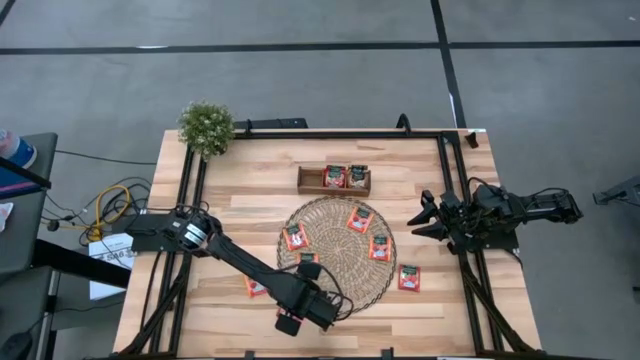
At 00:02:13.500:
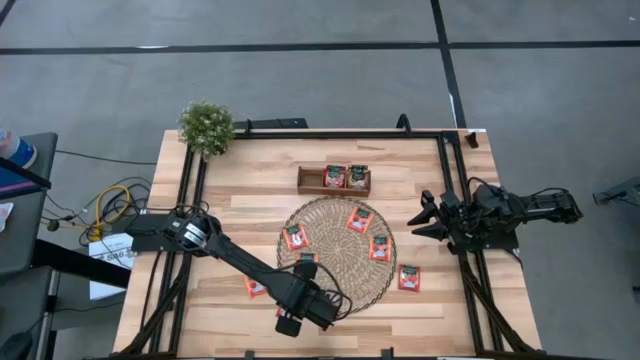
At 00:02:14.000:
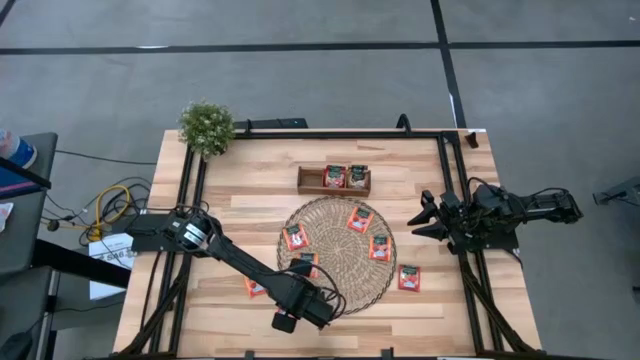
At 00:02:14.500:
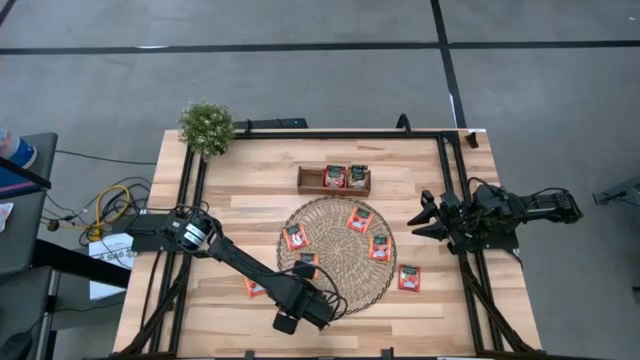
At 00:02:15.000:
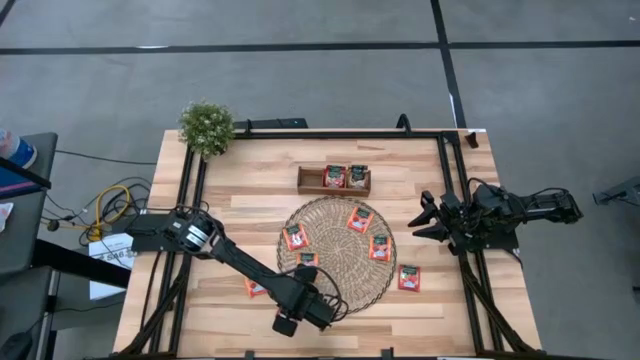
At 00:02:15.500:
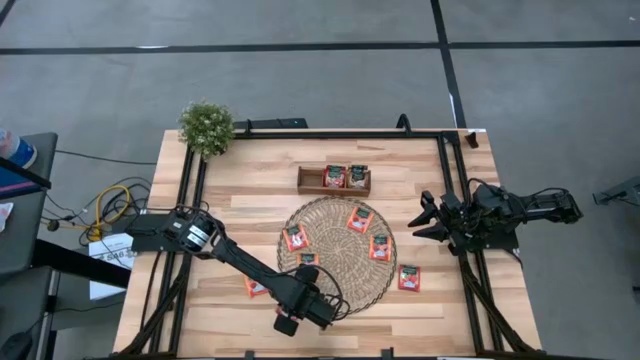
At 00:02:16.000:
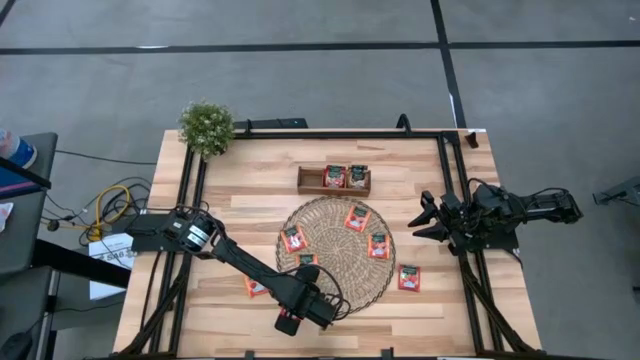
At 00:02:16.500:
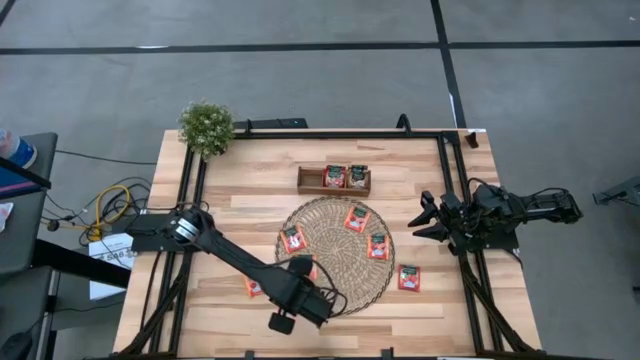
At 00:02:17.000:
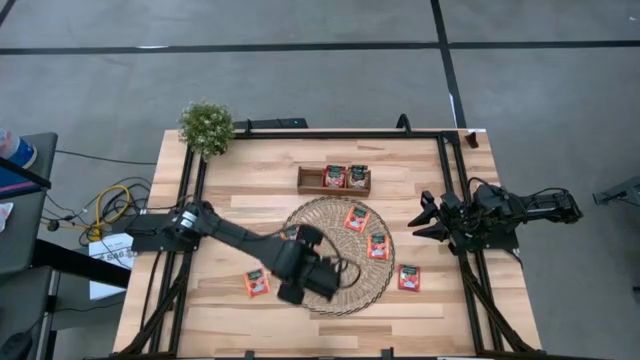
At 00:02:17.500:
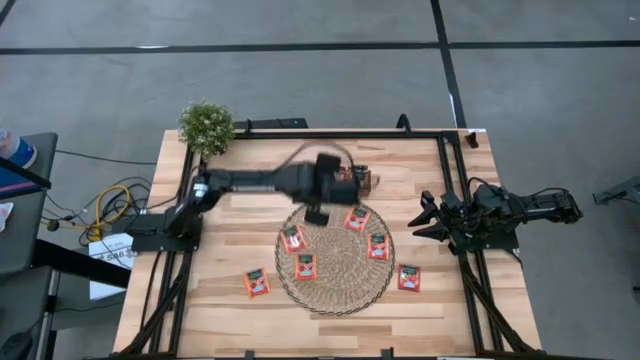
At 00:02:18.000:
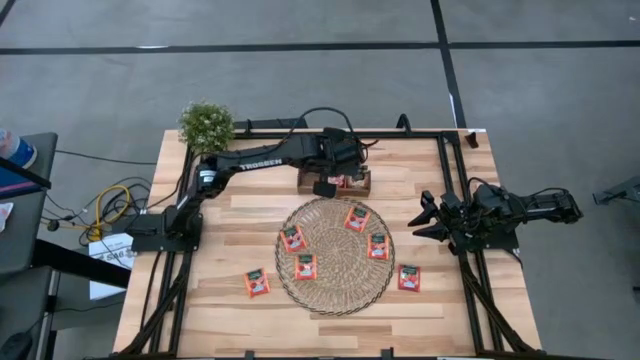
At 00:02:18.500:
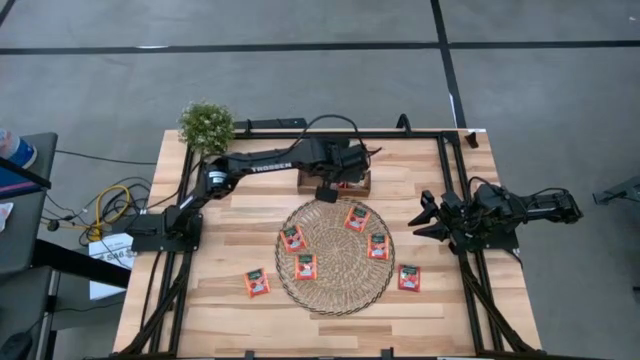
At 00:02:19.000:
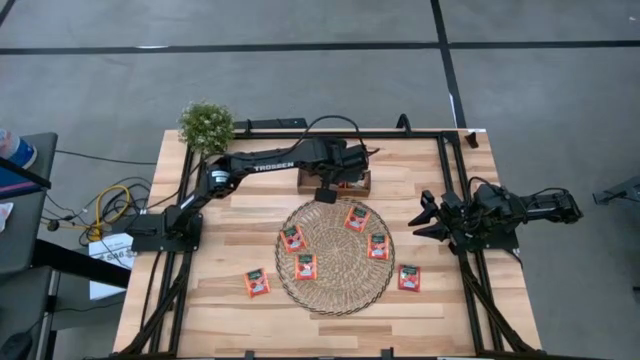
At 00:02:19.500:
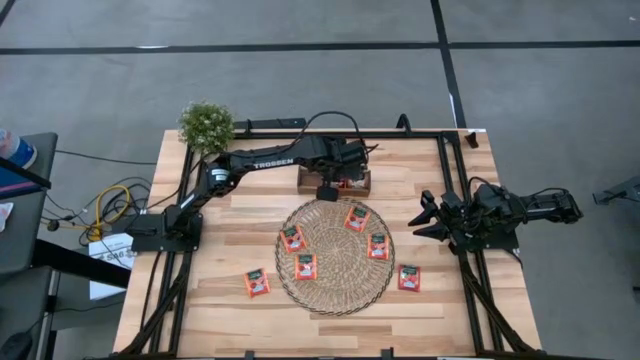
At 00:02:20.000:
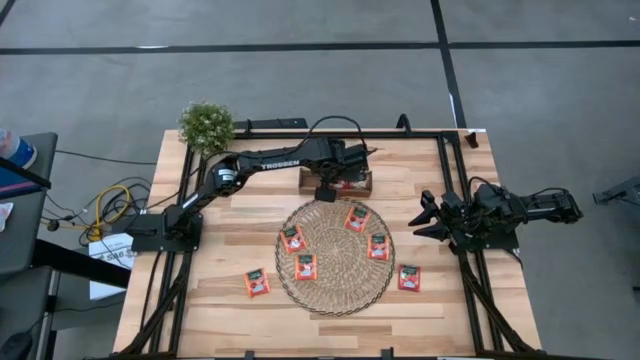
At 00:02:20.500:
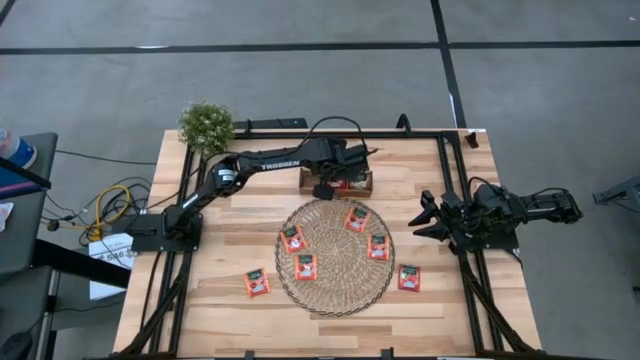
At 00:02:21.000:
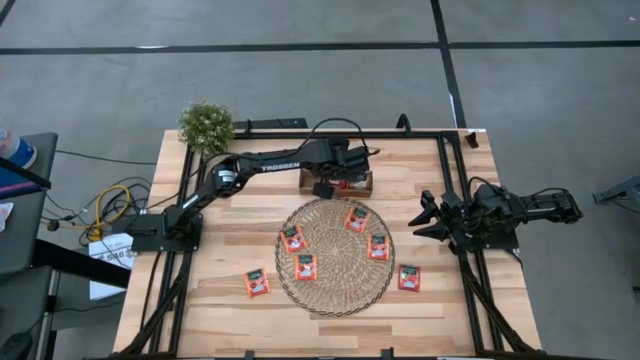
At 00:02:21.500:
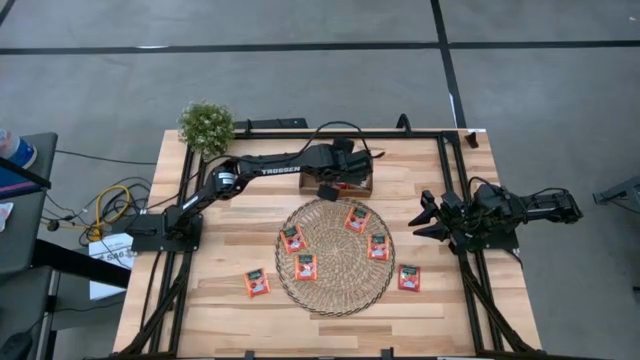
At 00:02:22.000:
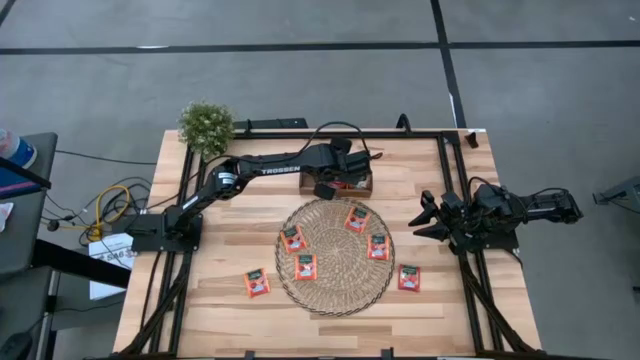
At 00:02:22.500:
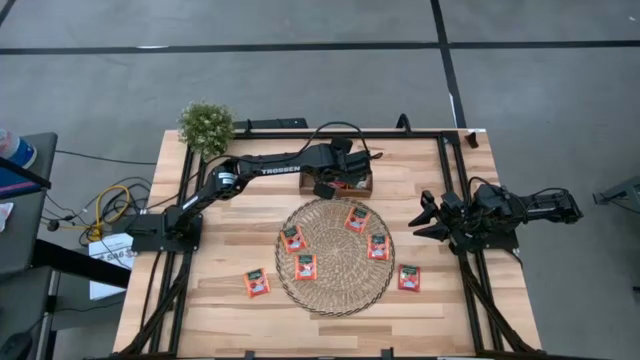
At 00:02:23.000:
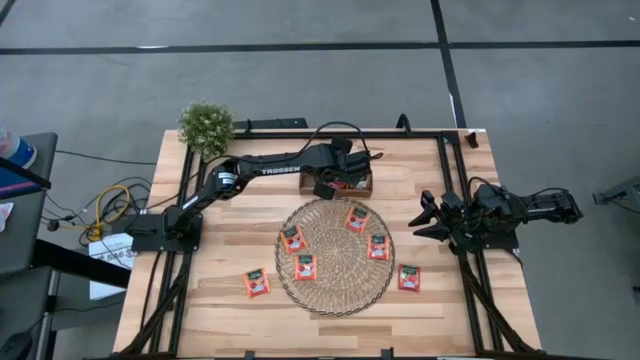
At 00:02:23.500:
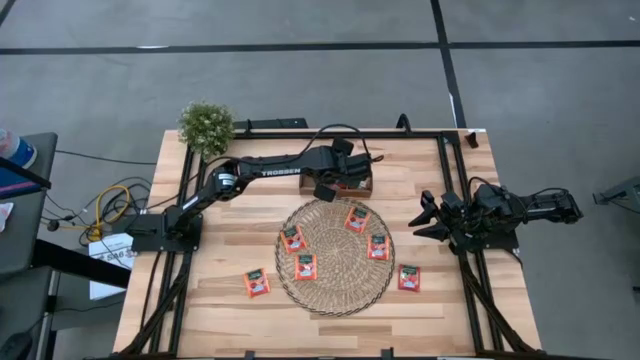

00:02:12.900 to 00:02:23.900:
Task: Pick & Place Tea
Put the red tea bag into the middle section of the wooden organizer

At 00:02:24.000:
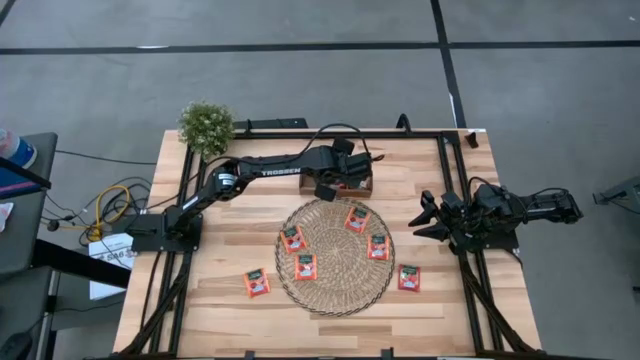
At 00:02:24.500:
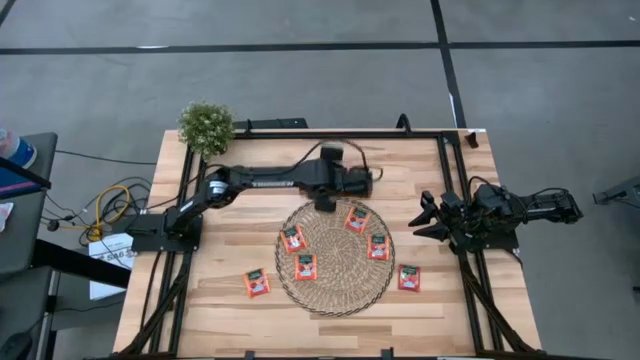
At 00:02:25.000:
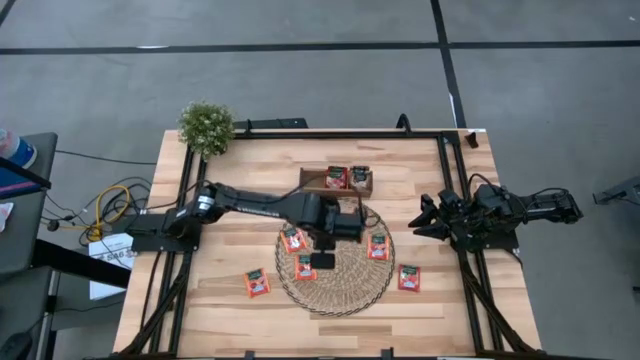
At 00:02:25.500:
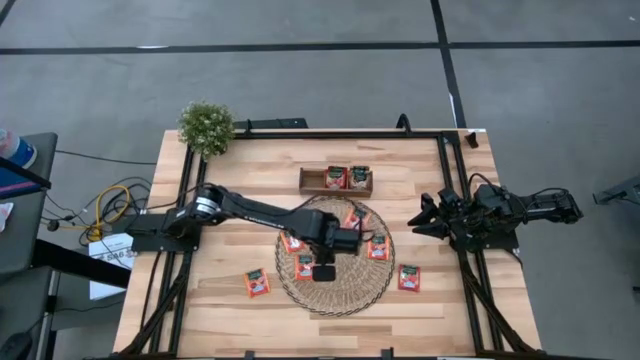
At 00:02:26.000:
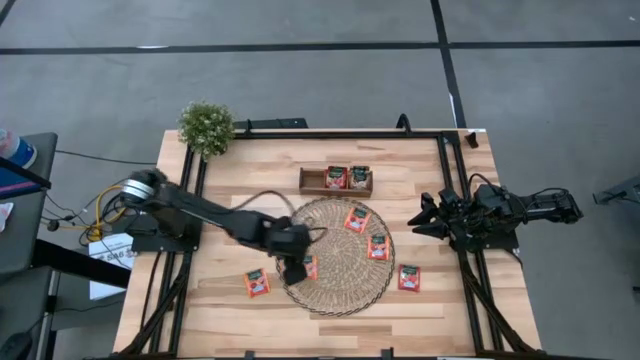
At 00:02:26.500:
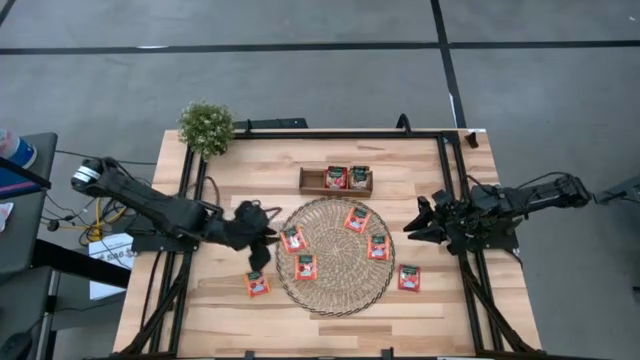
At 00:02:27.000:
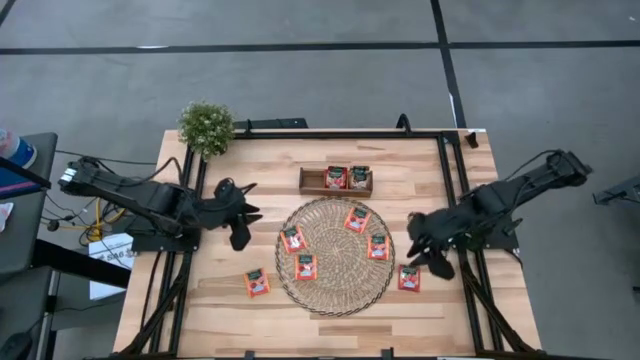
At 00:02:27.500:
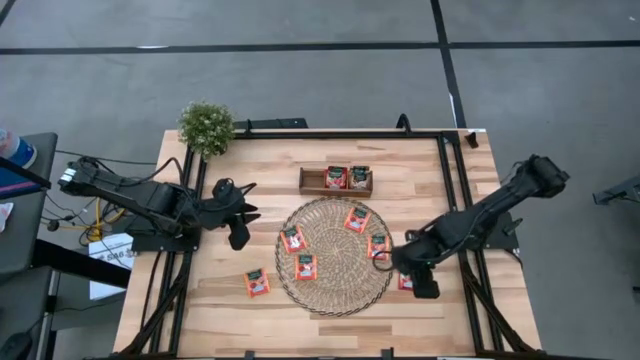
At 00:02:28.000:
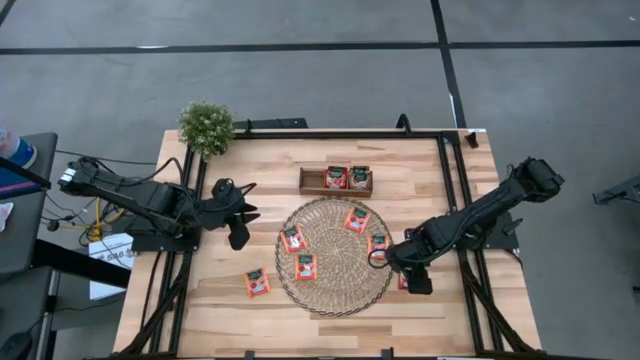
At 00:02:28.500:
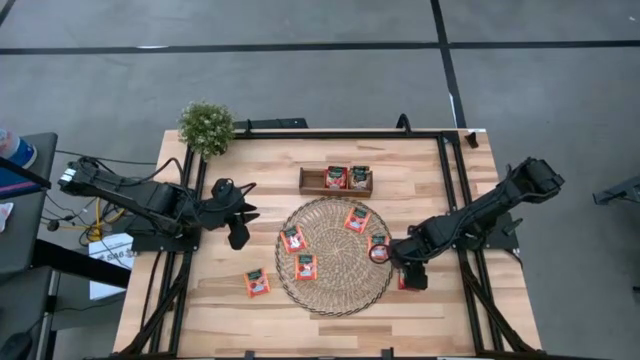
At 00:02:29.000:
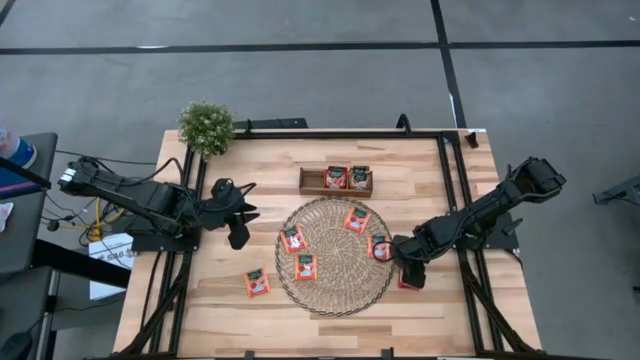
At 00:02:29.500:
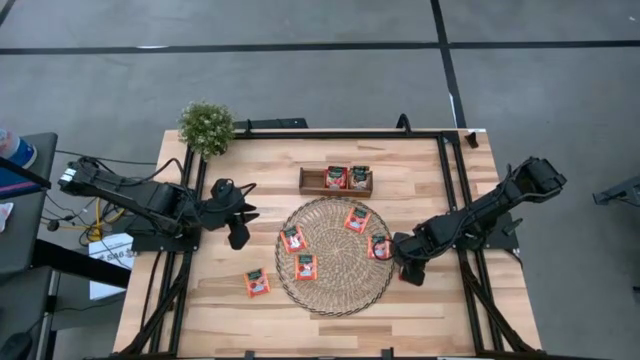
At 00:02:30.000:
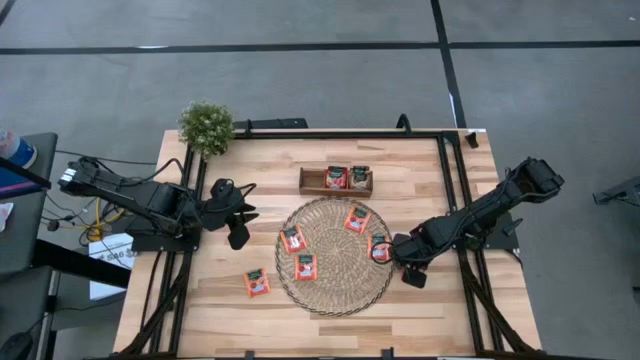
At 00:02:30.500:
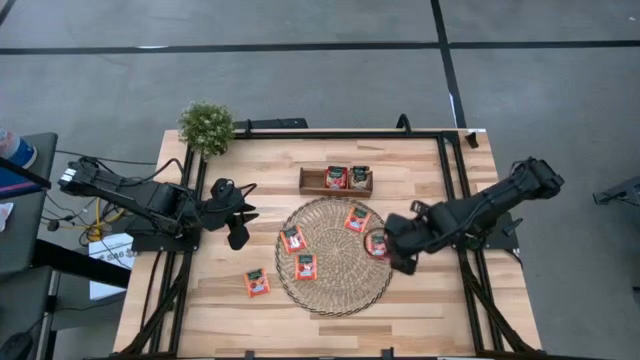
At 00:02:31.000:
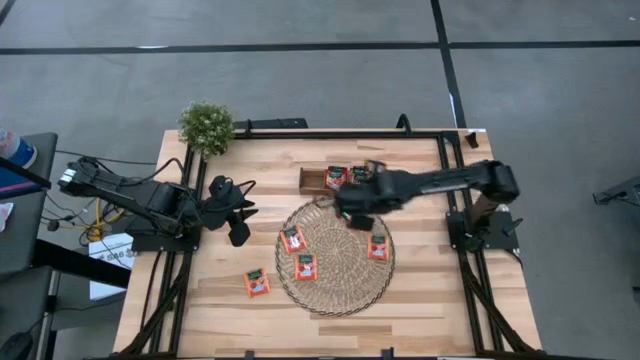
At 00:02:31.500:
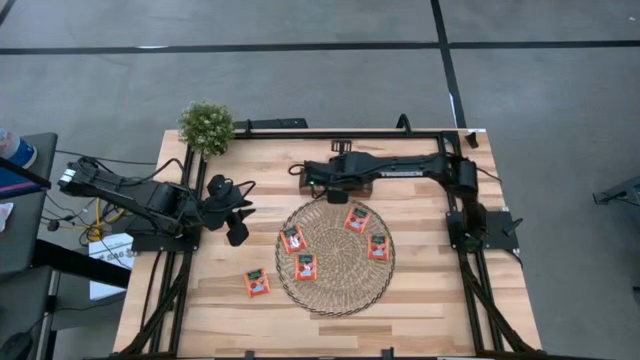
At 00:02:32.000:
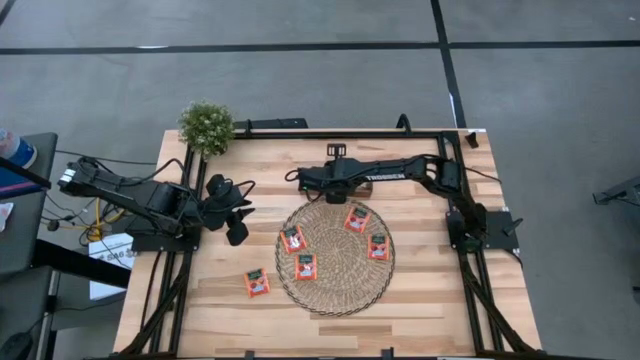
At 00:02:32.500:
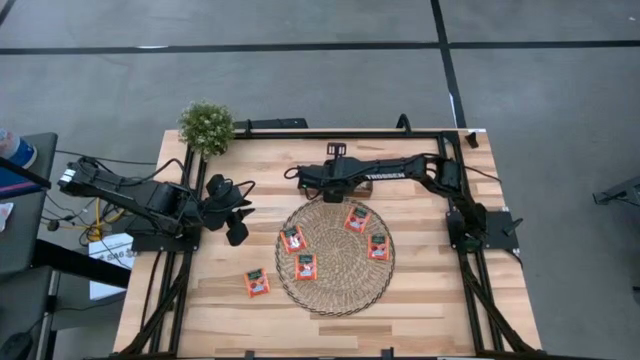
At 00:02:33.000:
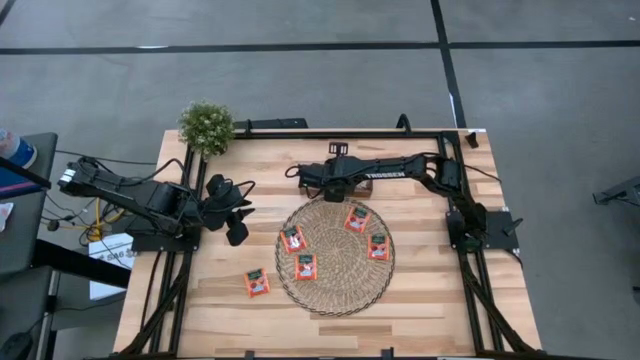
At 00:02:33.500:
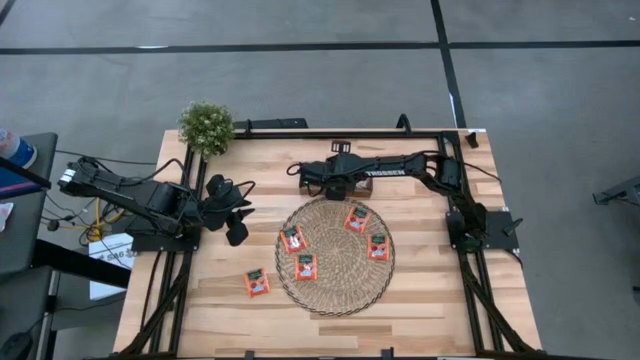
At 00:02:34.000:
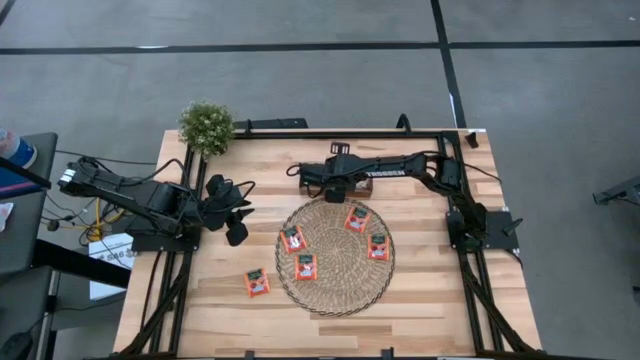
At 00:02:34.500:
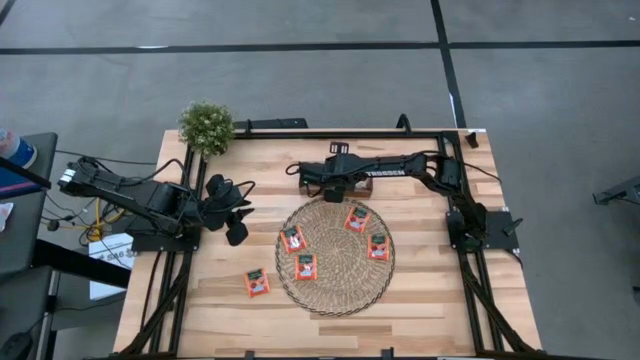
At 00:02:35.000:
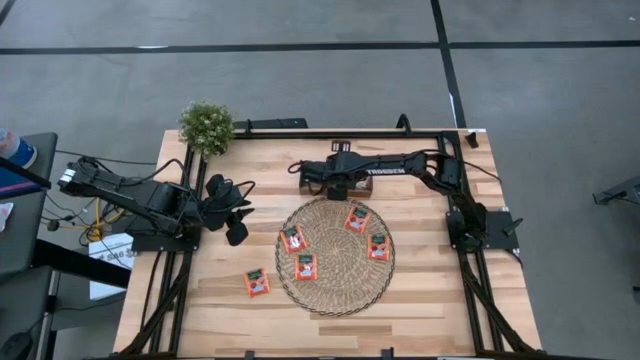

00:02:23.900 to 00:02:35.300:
Put the red tea bag into the middle section of the wooden organizer
